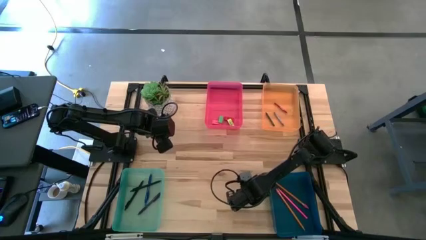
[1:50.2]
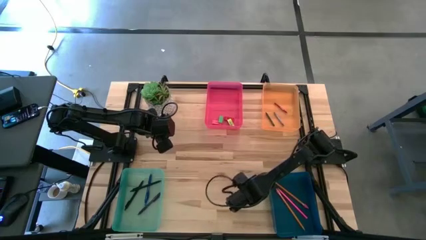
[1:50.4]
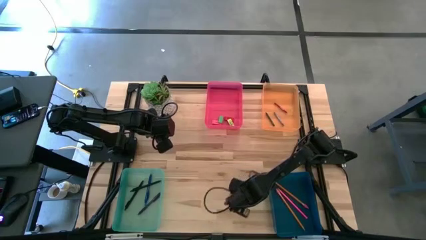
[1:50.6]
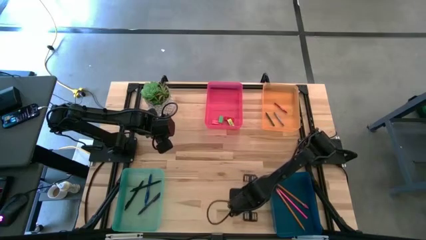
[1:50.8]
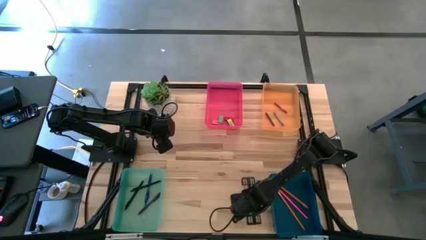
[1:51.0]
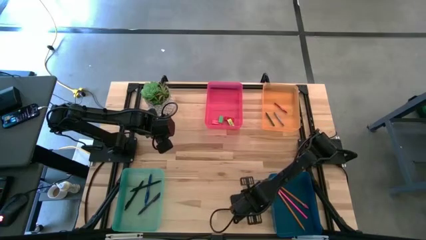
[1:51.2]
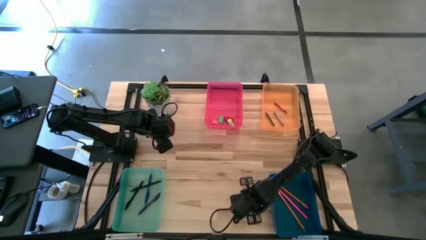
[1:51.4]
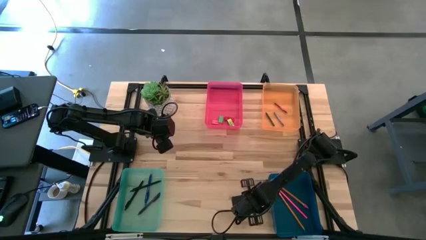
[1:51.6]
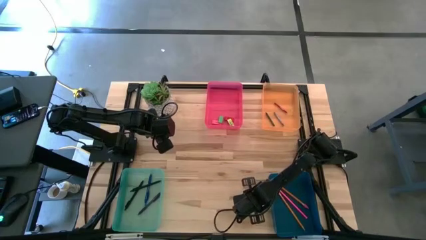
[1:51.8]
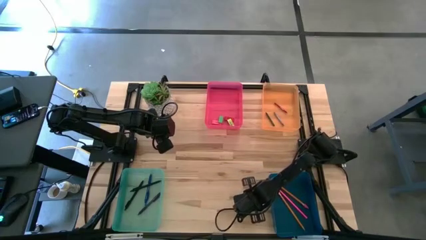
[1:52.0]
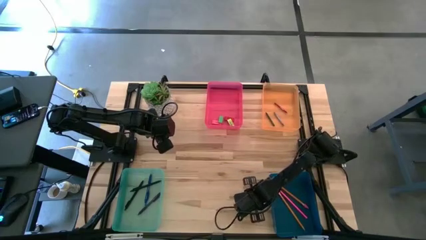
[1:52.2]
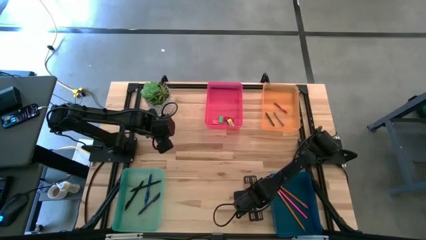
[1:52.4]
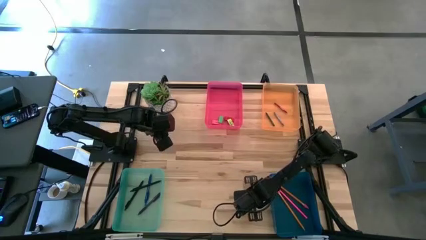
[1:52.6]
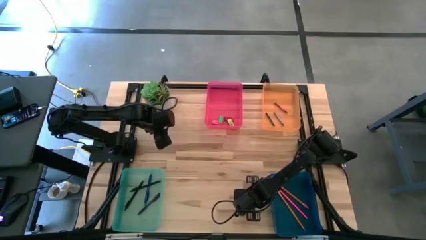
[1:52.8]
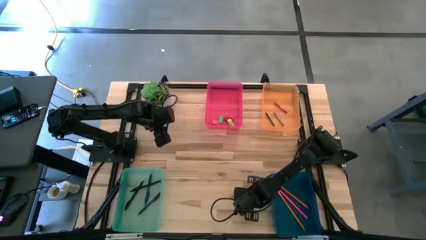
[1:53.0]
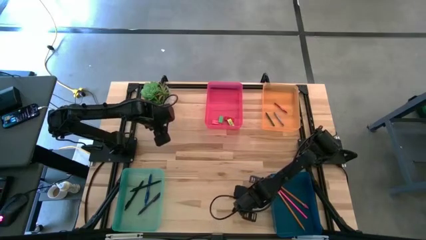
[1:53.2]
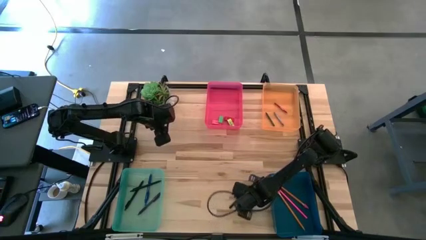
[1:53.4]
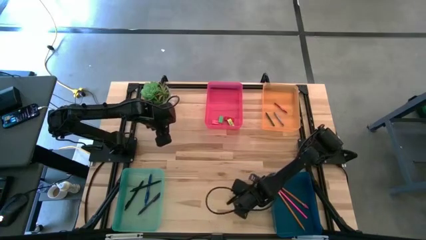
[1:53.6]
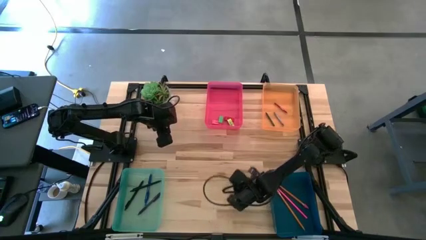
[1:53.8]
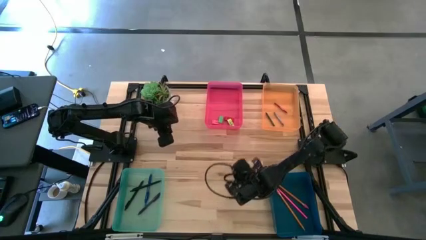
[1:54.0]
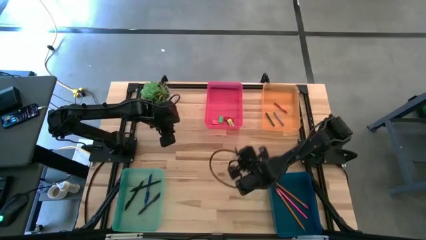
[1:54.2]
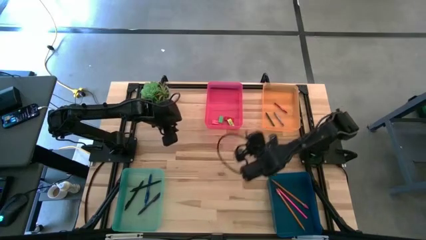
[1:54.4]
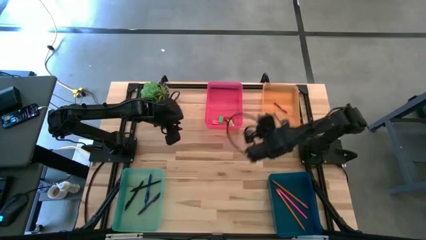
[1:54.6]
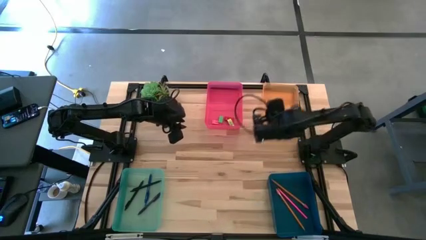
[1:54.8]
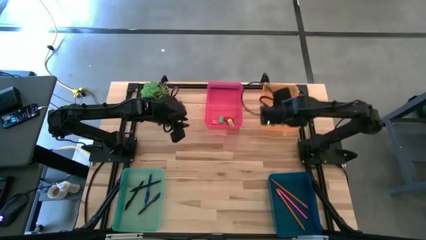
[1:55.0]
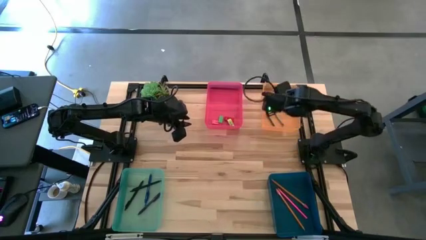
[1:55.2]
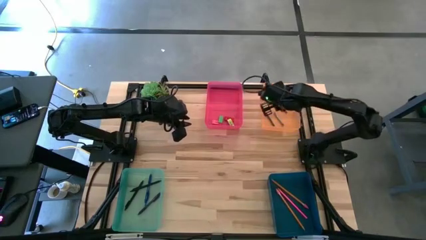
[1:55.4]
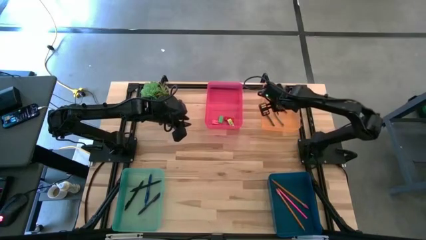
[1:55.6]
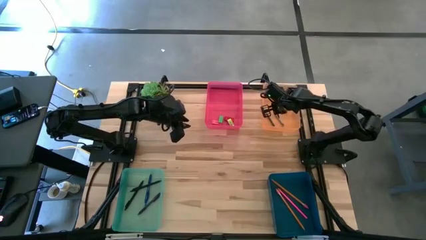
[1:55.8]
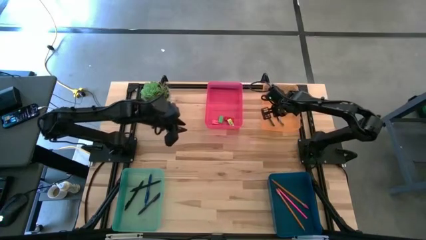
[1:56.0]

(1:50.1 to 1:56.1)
Task: Sort crayons/erasers/pens/pencils in bins
Put the blue crayon into the orange bin

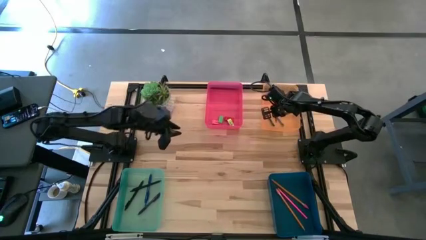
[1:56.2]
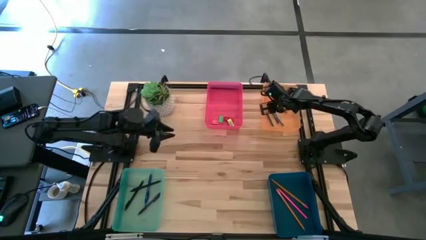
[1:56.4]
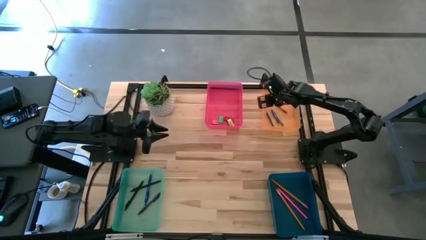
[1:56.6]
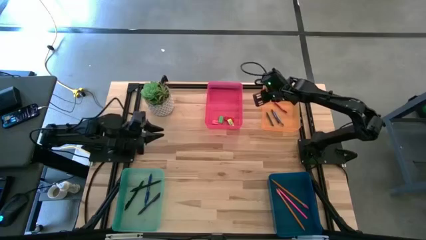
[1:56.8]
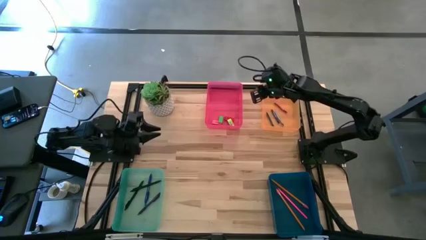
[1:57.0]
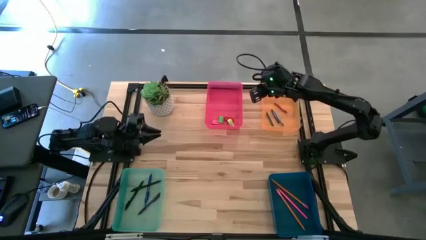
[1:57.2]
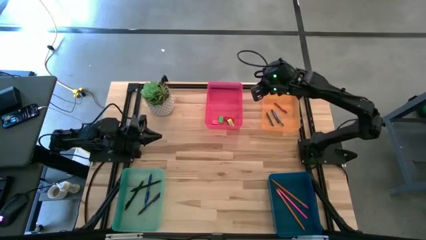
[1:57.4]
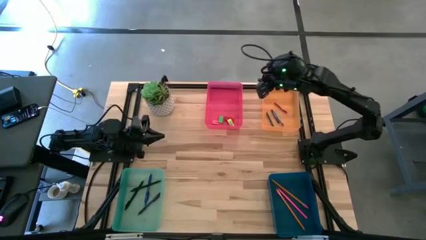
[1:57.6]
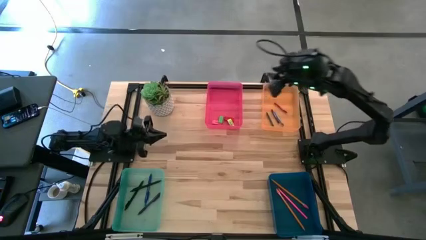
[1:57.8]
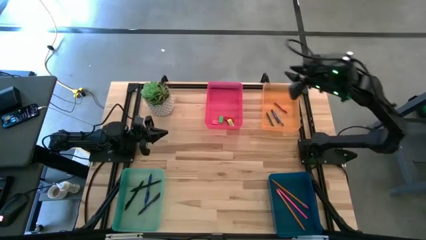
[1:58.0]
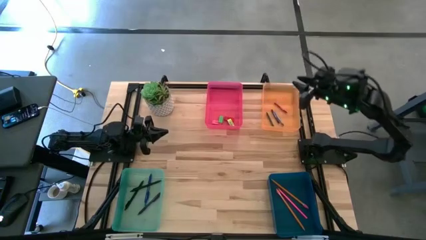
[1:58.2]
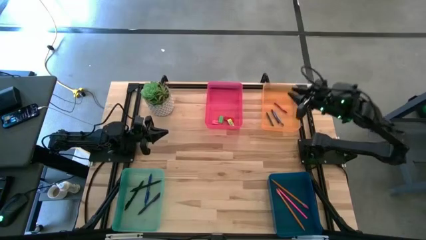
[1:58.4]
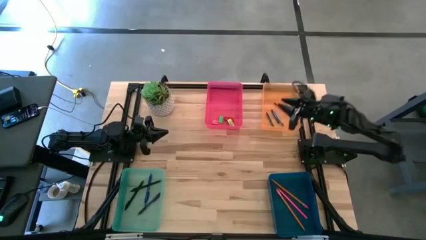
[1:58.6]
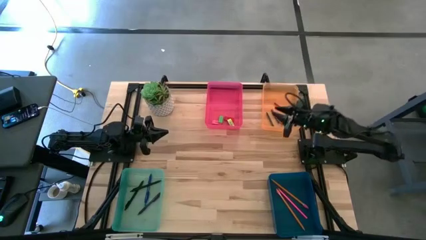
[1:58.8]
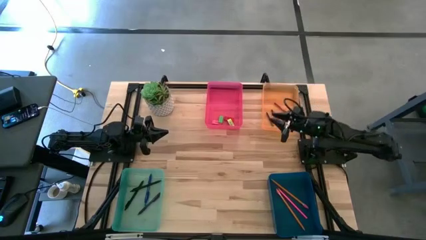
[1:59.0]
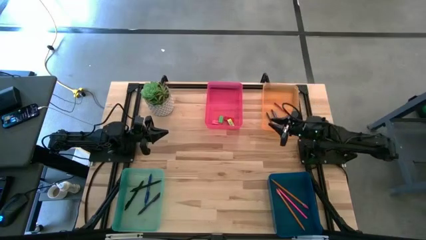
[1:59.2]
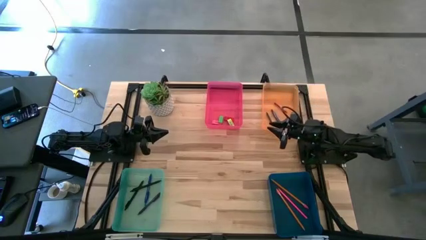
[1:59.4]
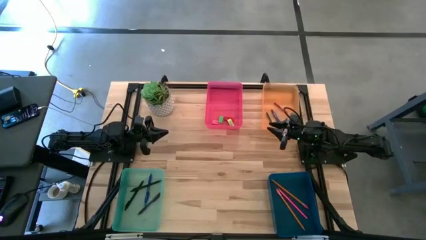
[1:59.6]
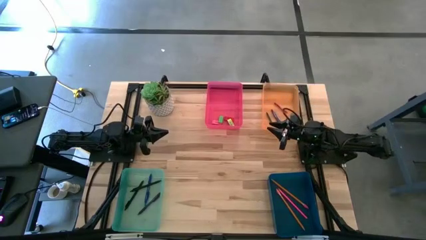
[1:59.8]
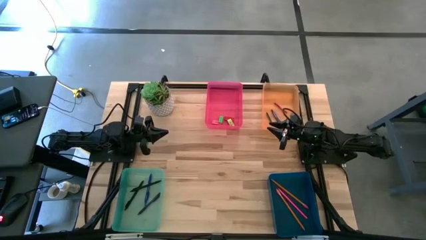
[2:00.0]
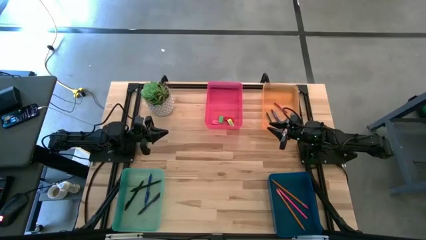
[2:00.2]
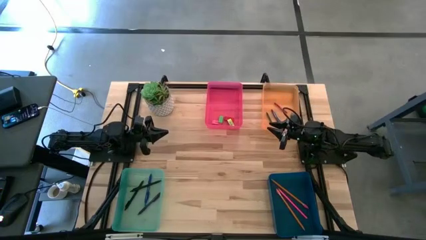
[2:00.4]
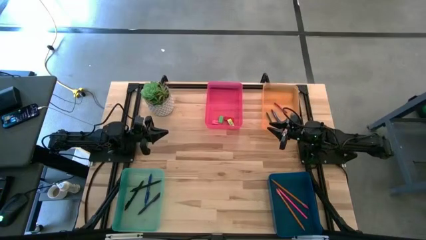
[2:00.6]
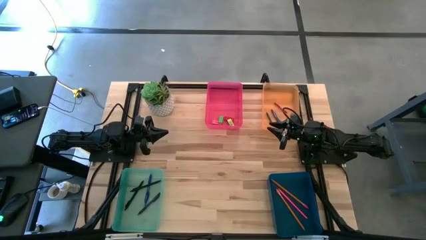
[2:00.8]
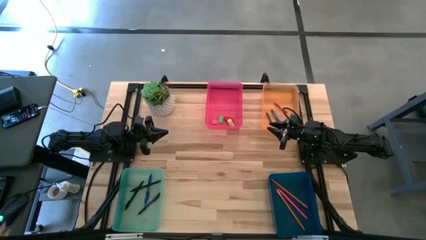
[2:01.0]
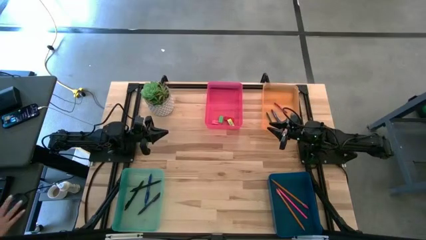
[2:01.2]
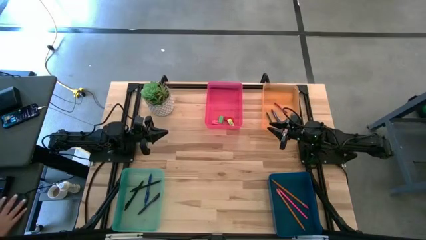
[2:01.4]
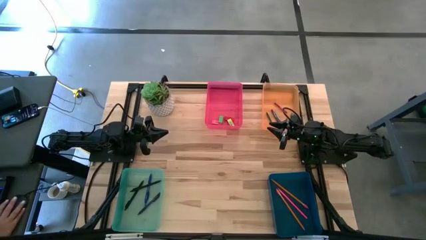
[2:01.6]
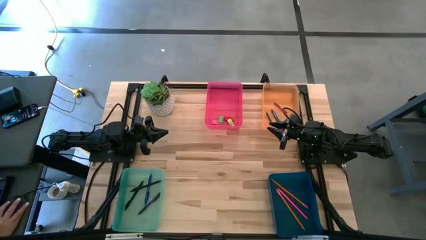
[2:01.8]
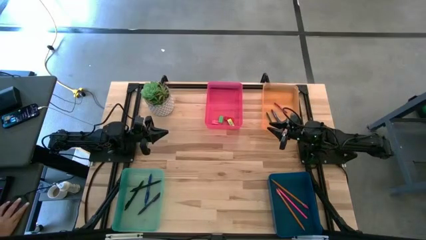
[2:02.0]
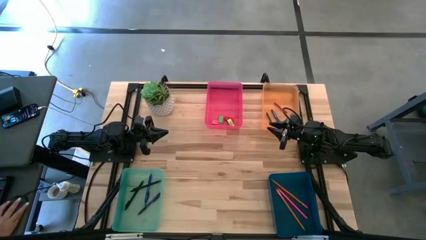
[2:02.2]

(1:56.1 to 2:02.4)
Return to Home Position

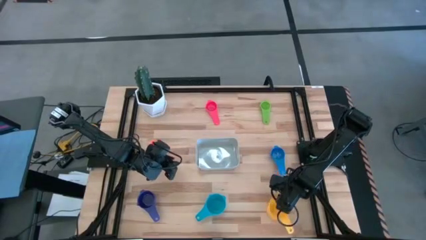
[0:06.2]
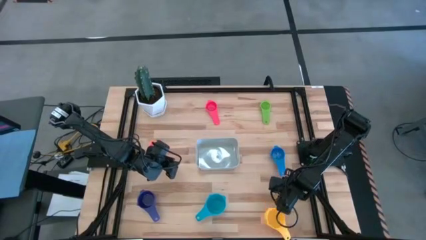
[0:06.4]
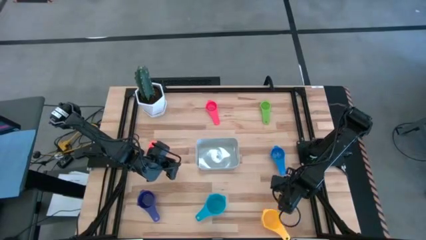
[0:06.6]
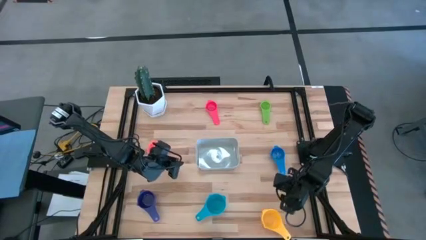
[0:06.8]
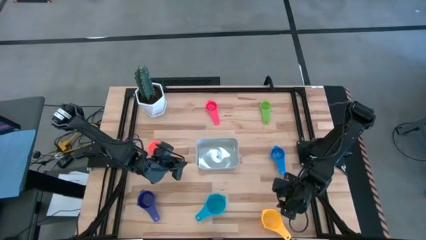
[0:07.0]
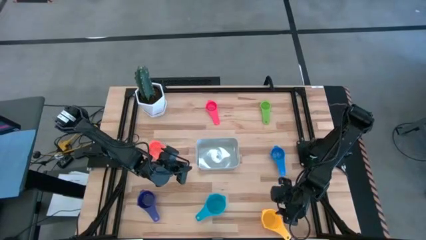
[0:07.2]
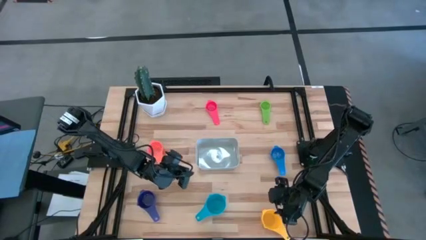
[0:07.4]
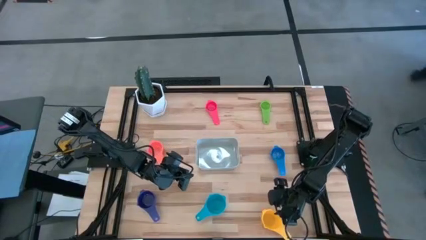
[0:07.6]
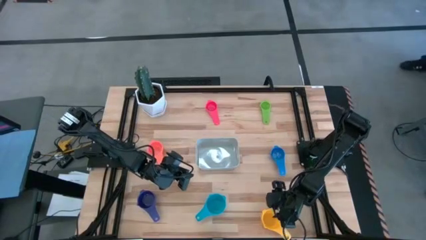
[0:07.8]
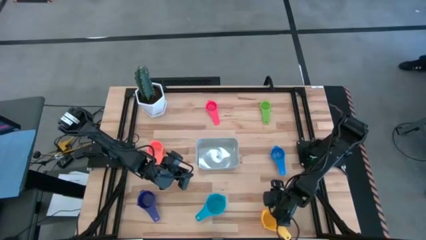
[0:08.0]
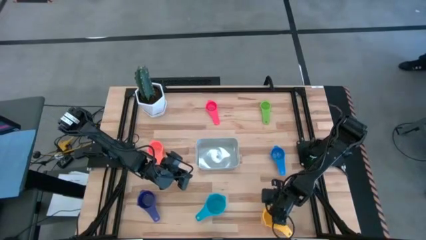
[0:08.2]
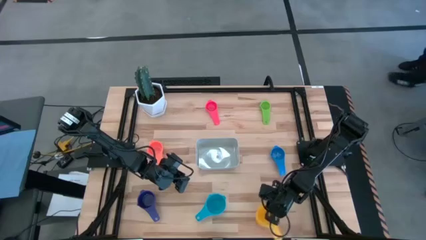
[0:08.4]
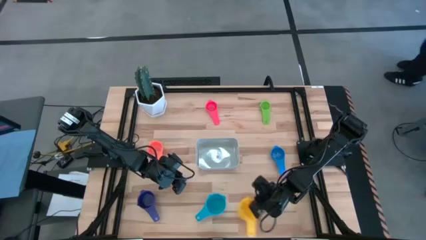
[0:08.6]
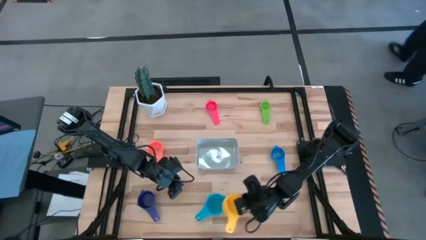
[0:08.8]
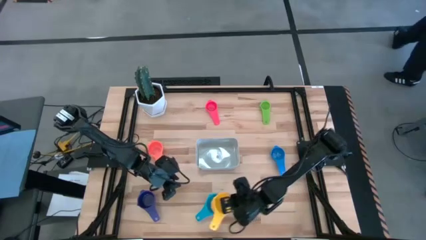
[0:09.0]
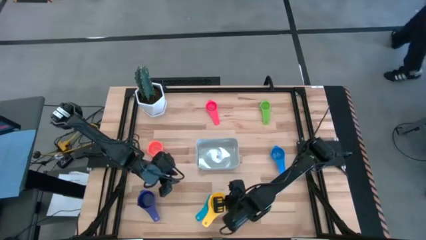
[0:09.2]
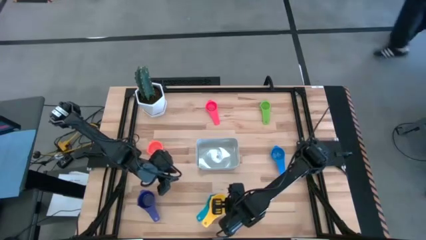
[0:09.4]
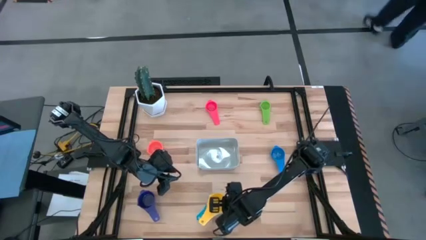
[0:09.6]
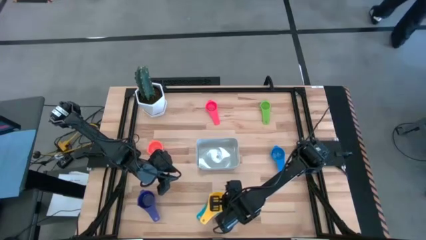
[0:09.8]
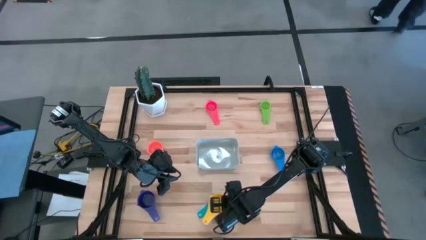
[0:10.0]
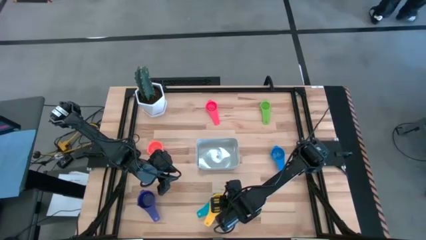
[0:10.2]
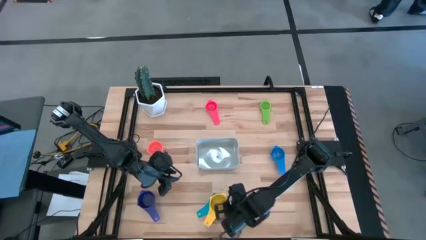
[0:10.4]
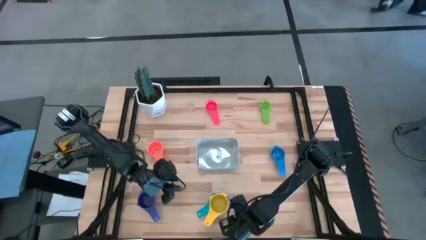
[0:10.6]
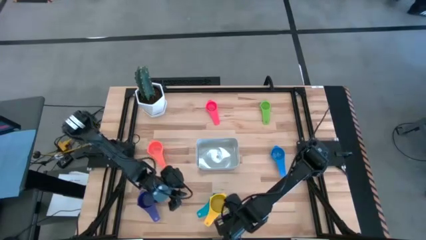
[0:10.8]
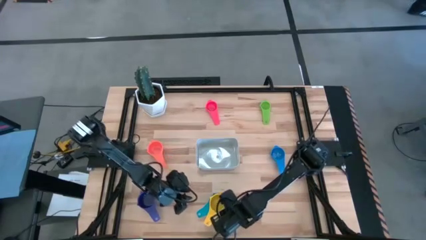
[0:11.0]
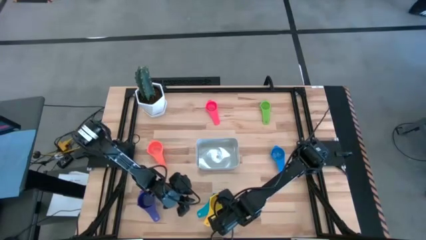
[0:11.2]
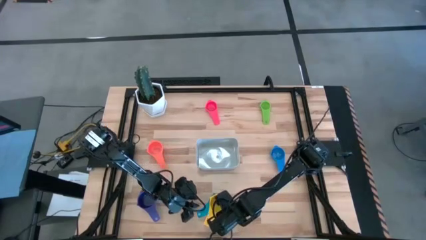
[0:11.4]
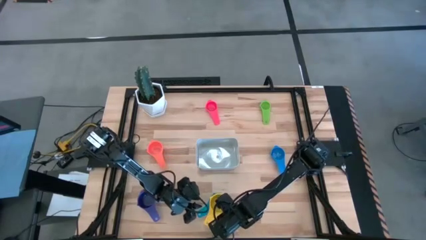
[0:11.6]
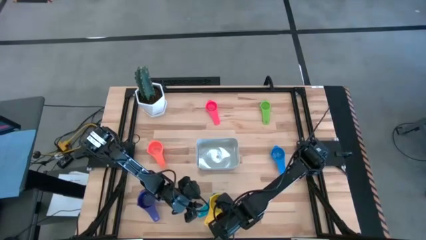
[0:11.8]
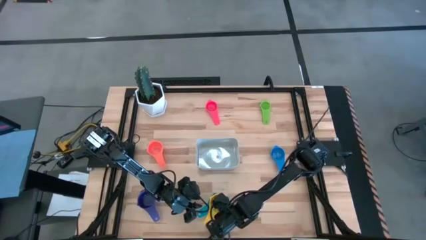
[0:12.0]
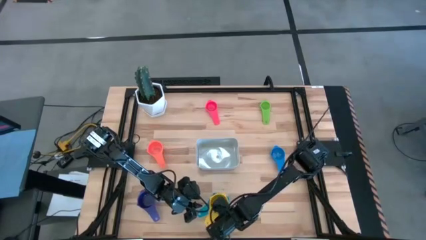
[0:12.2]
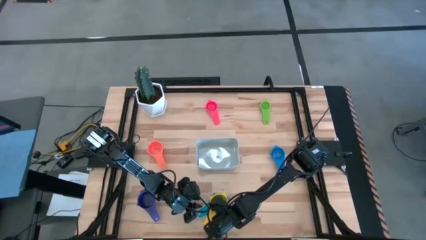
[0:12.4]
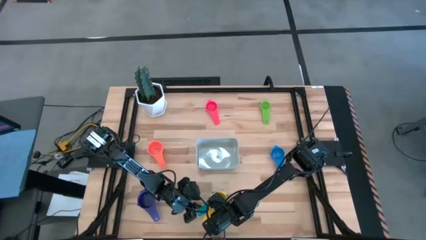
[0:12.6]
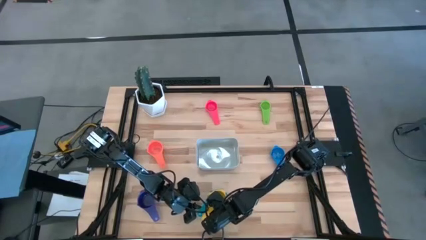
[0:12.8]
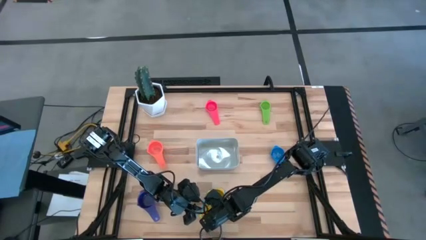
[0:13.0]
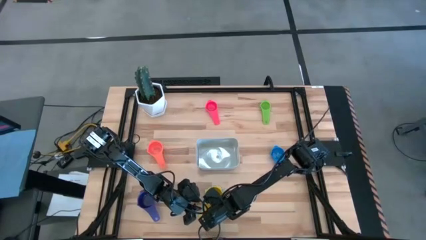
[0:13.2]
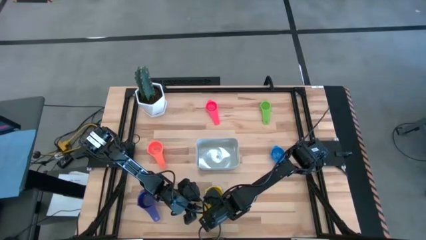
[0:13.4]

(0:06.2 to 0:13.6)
Task: Nest measuring cups in basket
Stack the yellow measuring cup on top of the light blue measuring cup
